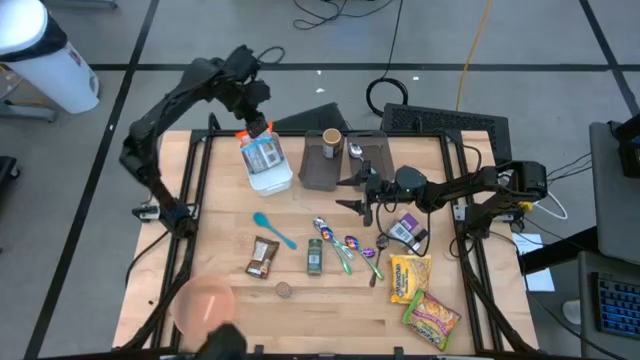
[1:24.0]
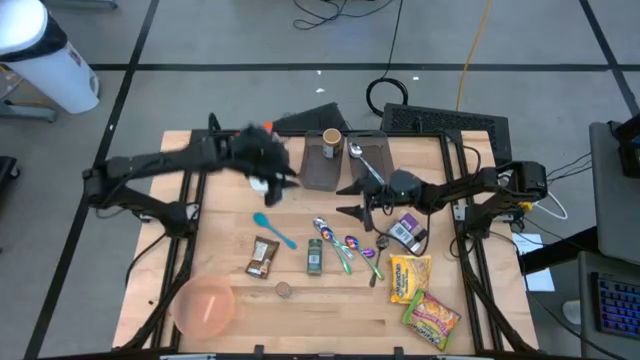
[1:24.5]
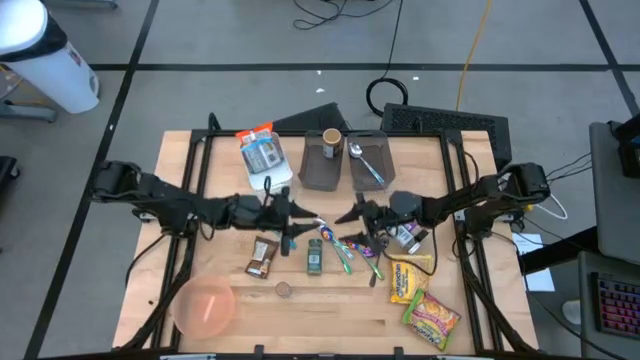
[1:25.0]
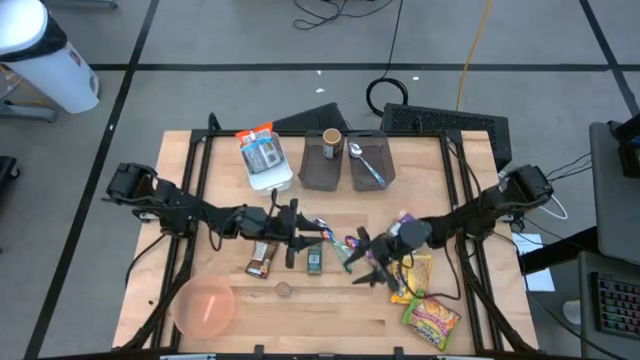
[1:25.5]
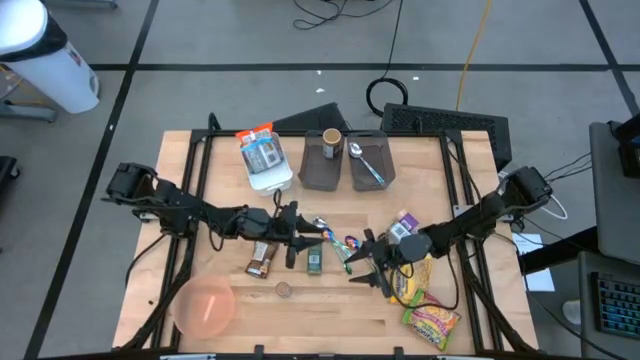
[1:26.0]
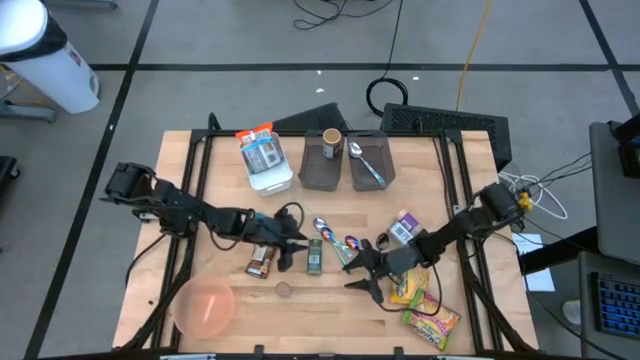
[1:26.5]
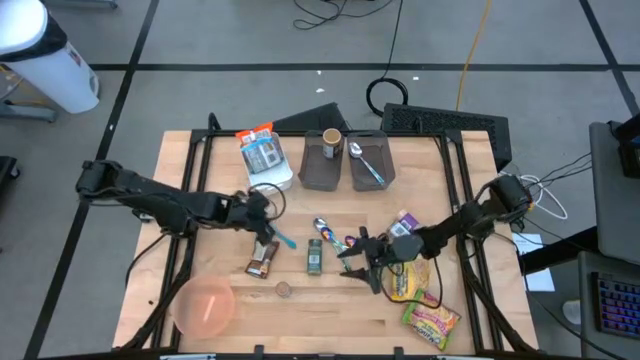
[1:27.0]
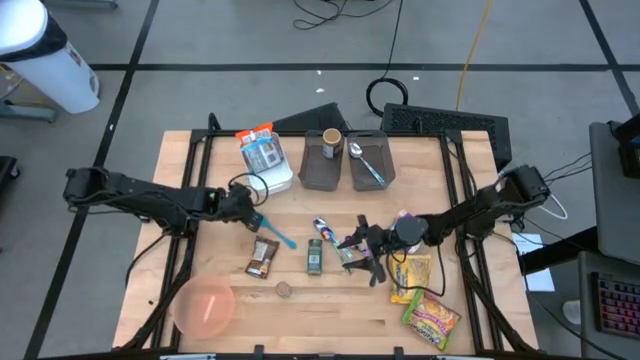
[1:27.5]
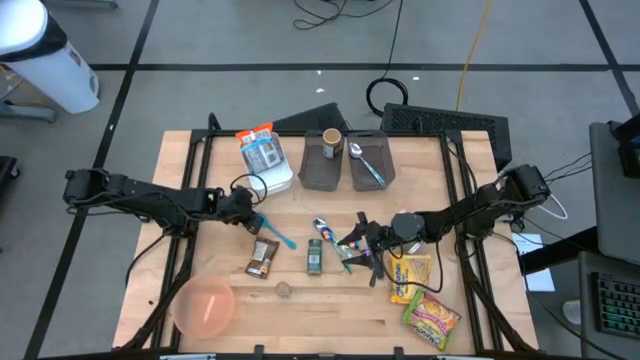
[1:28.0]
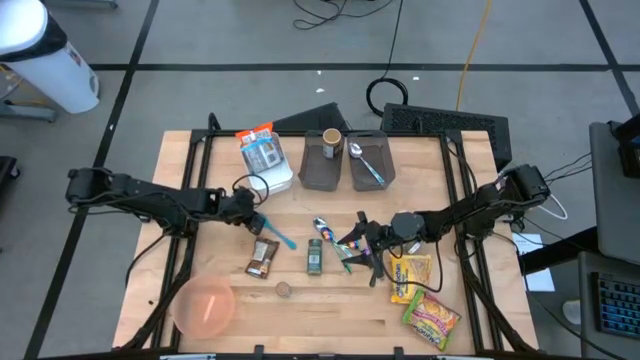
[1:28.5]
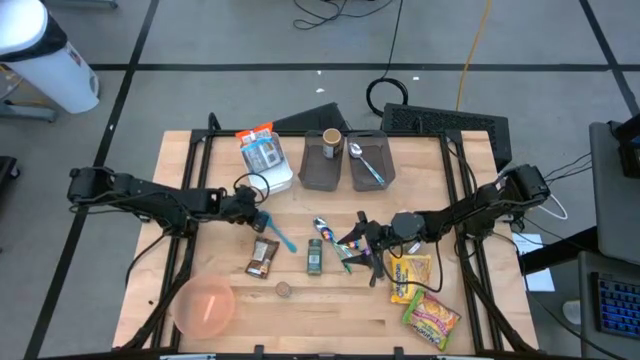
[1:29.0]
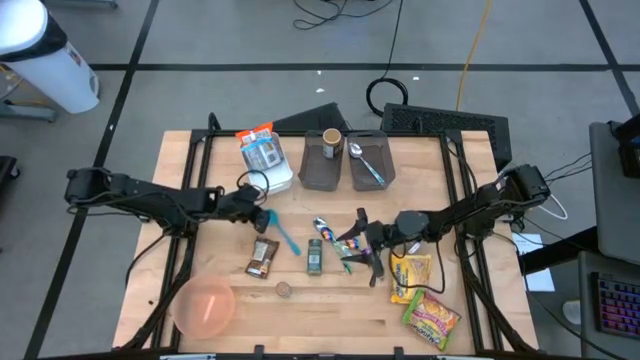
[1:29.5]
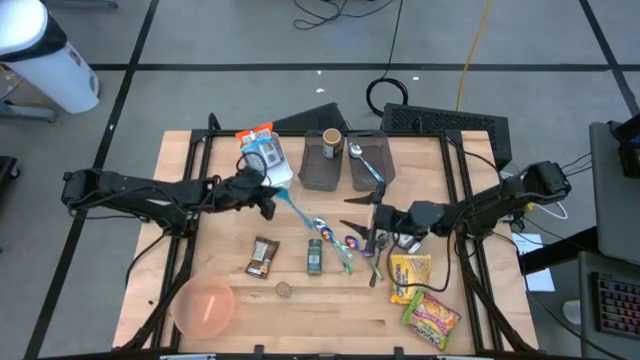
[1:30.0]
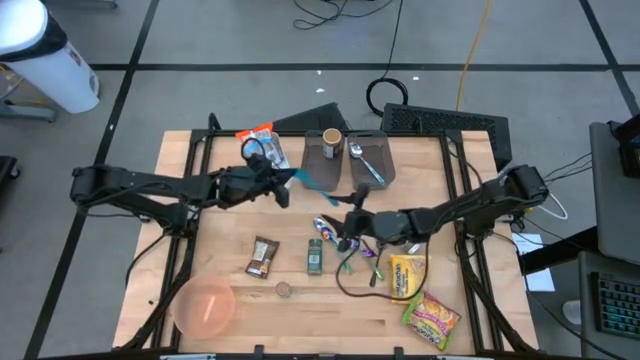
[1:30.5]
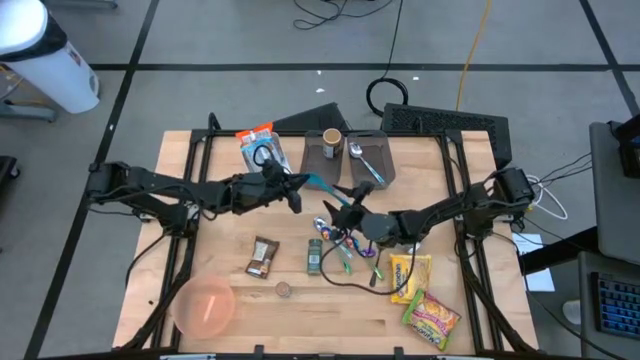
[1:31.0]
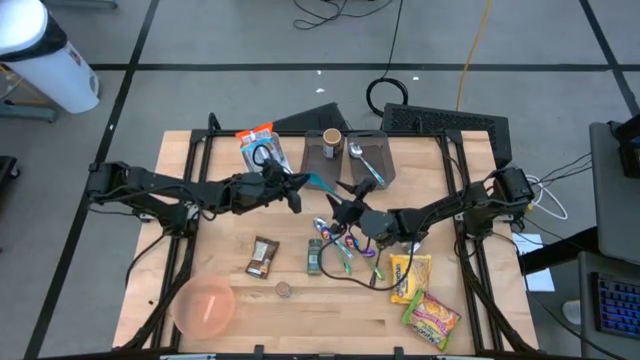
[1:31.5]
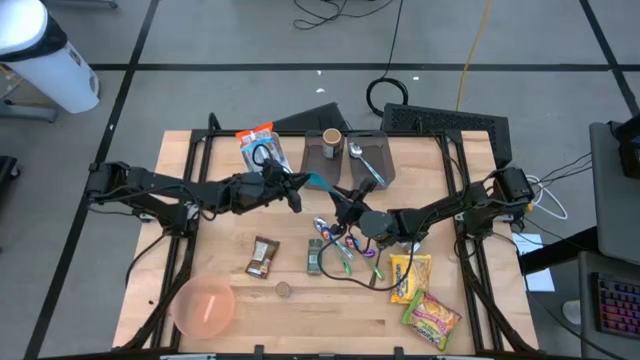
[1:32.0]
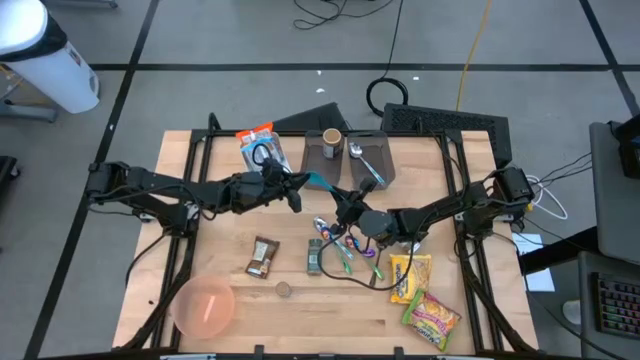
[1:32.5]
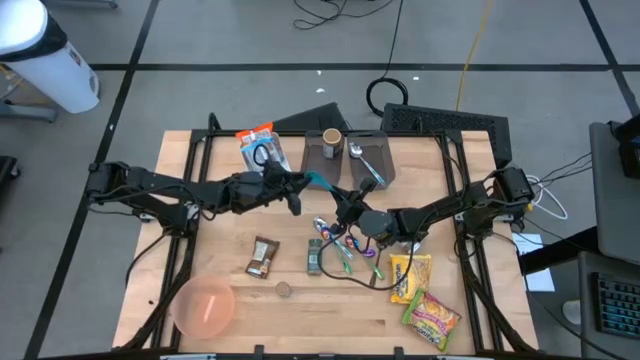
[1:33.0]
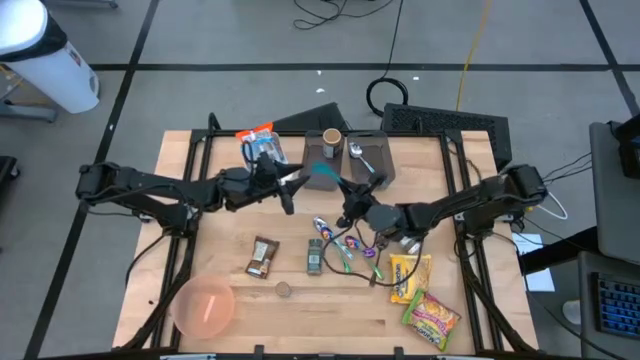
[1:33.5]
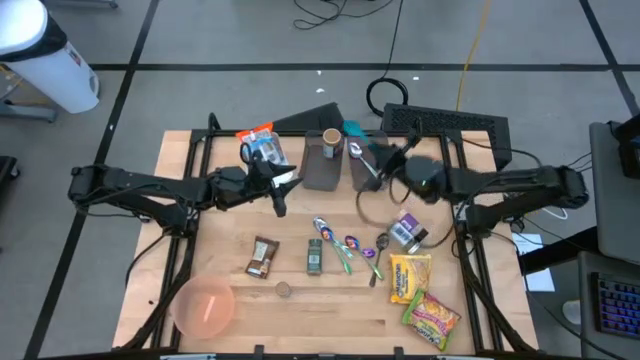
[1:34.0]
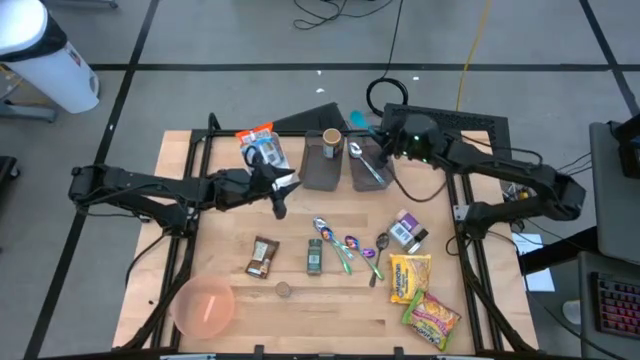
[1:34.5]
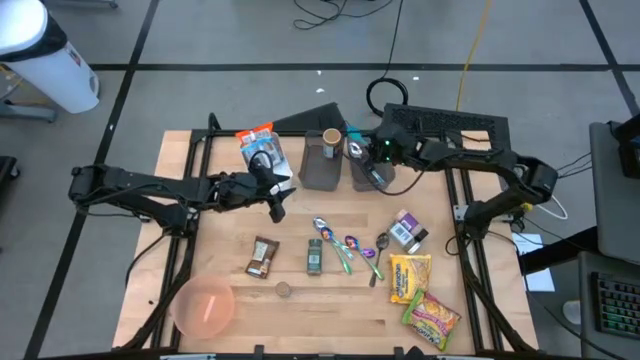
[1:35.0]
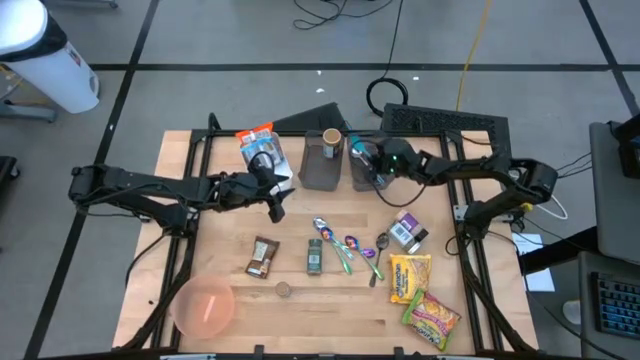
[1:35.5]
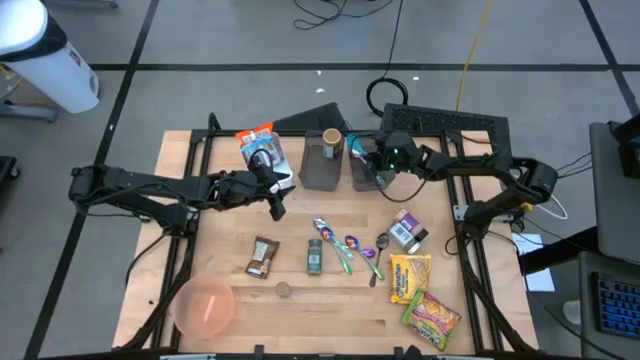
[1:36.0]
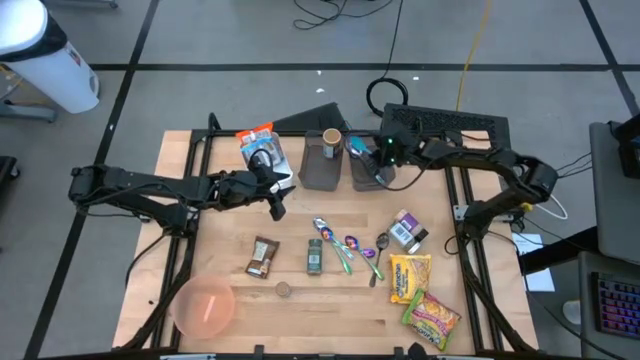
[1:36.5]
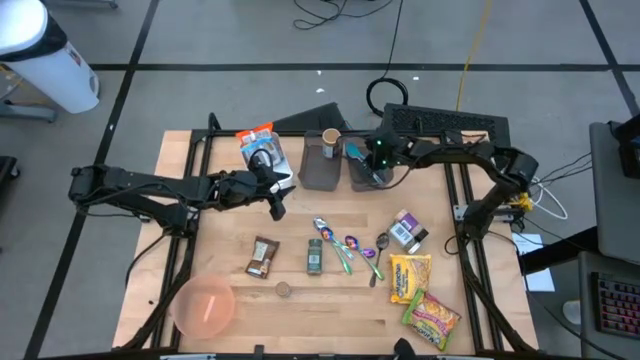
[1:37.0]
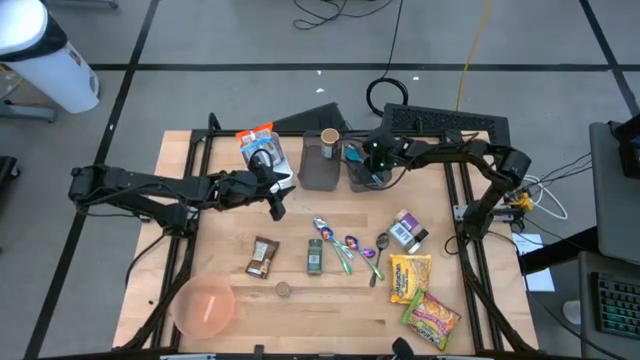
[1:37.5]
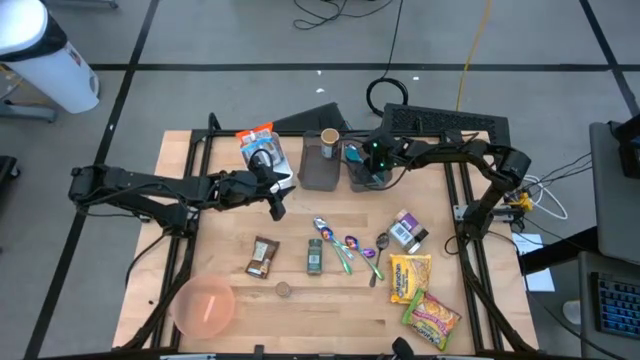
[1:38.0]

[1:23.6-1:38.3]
Task: Pick & Place Food Item
Put the blue baby spoon into the right black bin

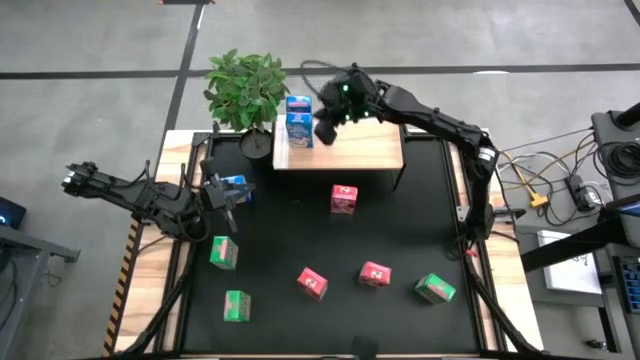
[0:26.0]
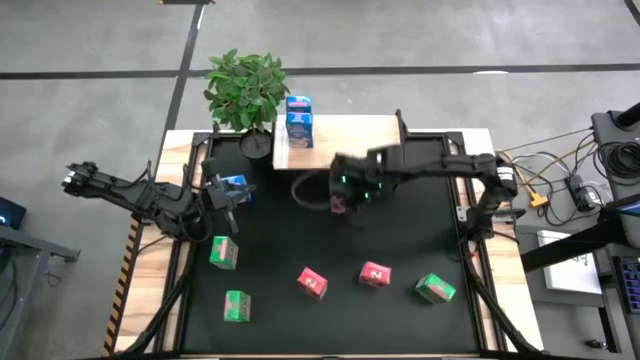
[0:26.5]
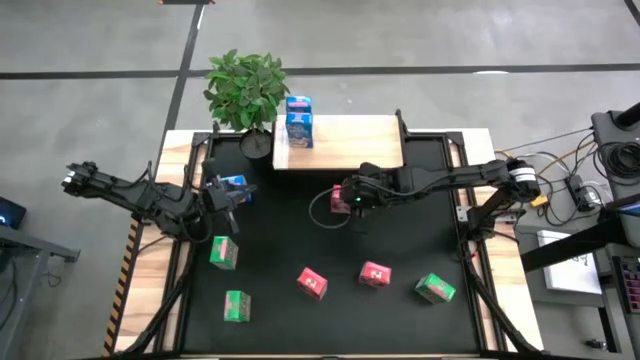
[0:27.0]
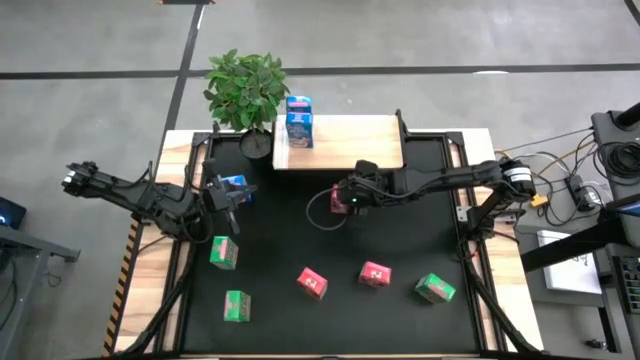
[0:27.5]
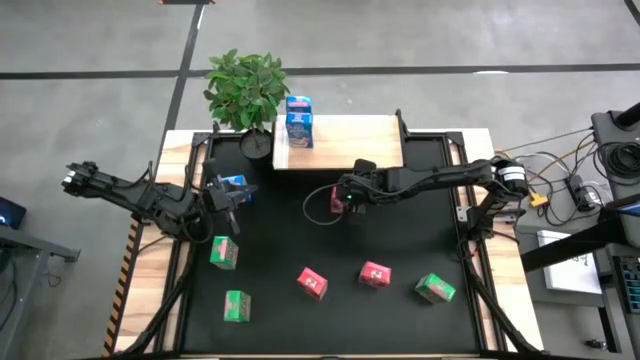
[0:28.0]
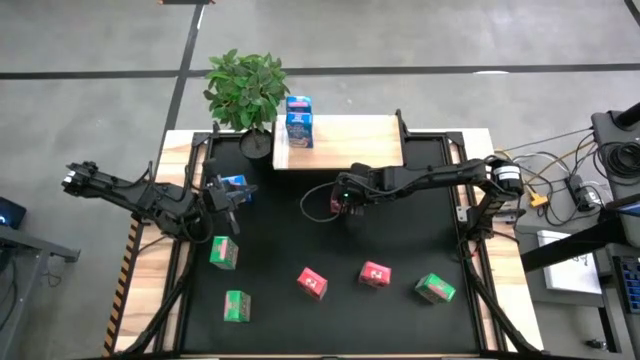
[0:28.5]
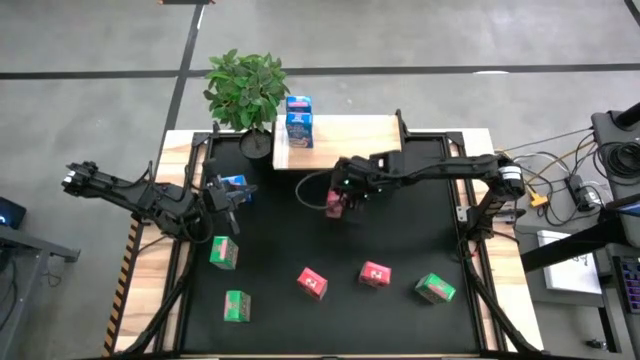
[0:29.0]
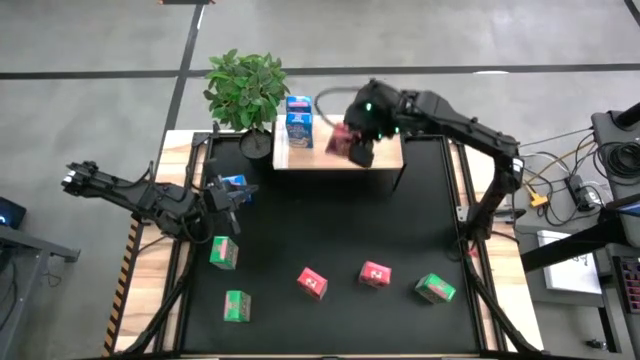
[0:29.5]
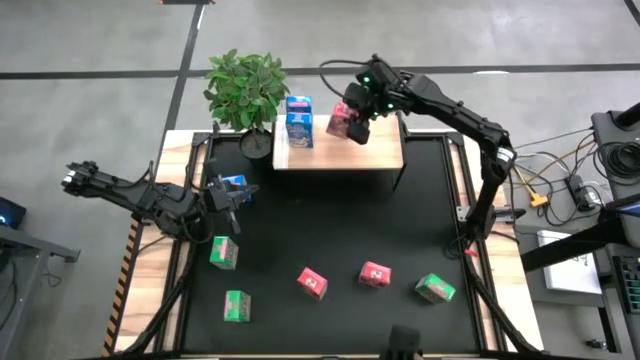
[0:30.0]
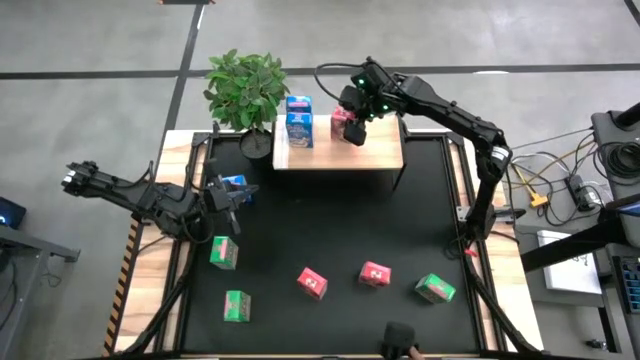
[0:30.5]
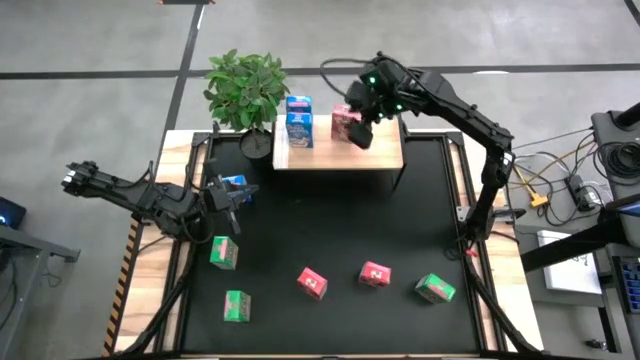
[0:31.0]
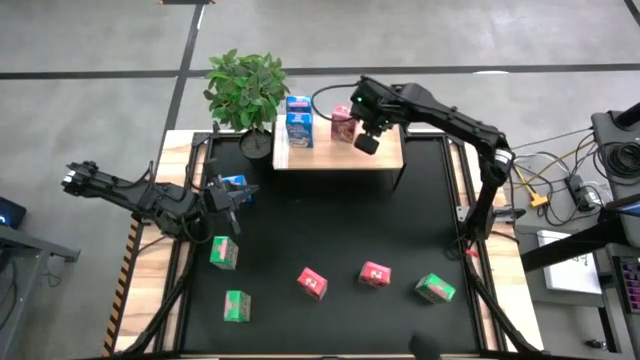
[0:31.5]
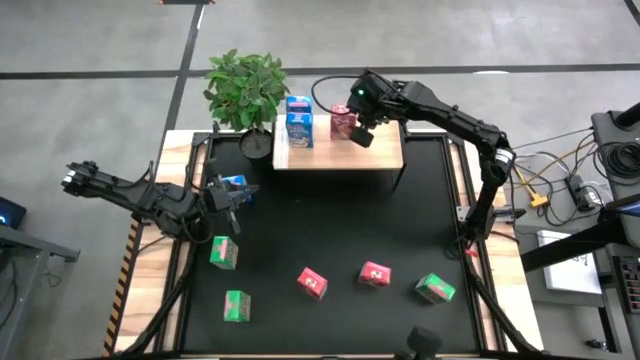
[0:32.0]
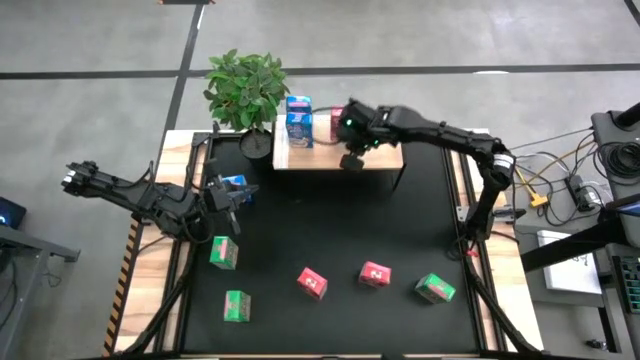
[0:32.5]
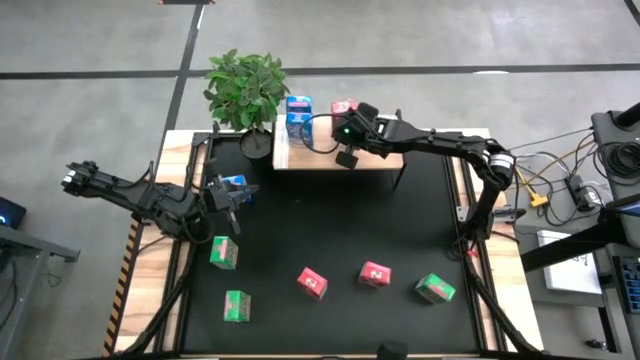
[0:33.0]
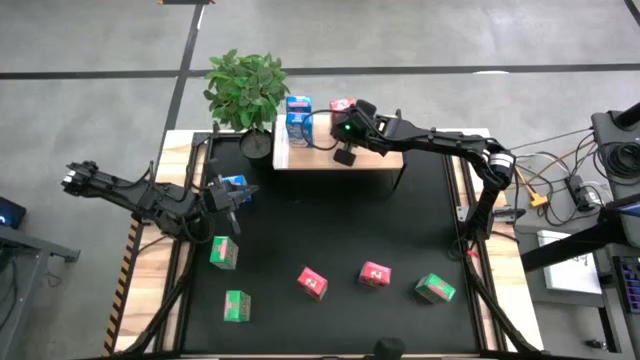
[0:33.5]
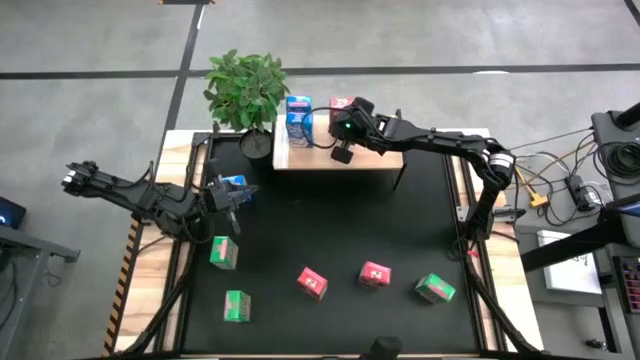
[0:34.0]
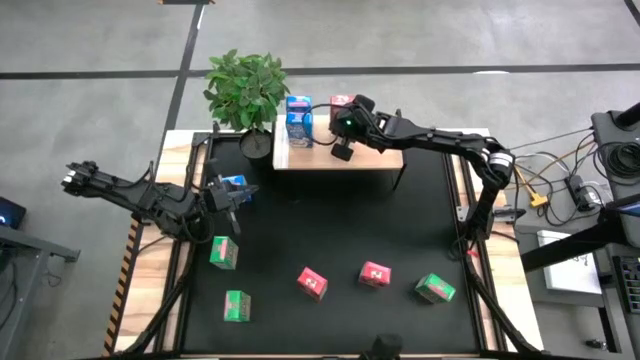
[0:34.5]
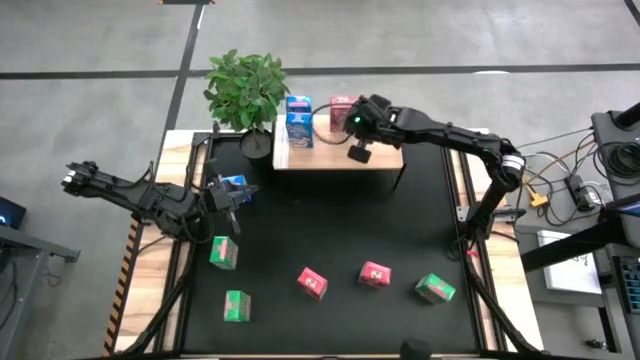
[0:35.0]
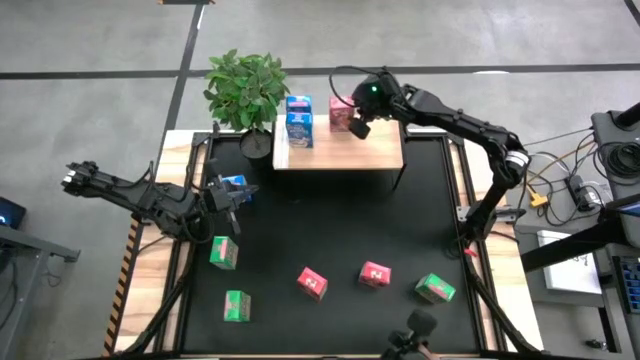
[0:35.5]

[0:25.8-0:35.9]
Task: Stack cereal on shelf
Put the top red cereal box on the shelf
